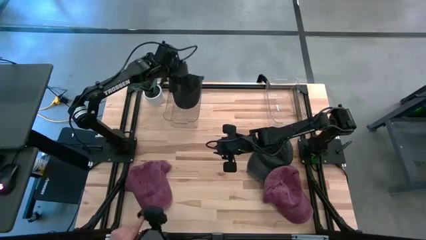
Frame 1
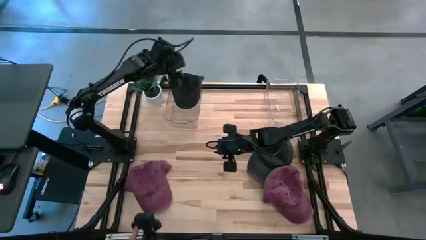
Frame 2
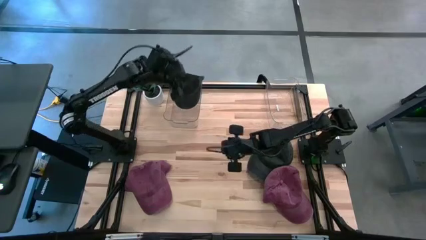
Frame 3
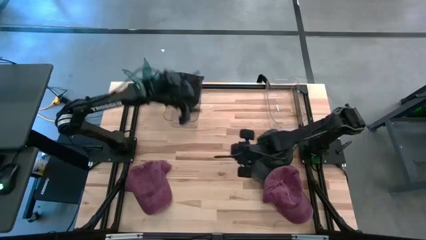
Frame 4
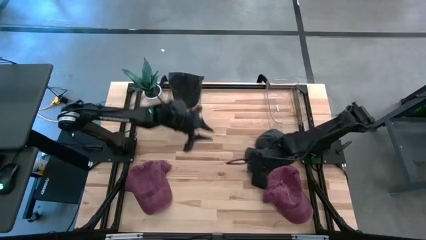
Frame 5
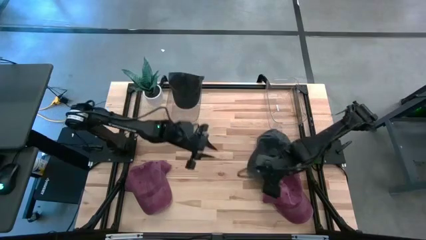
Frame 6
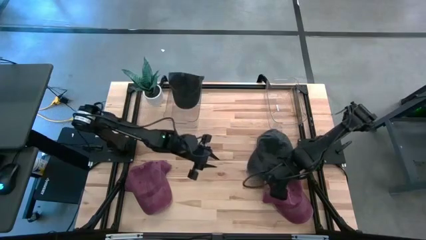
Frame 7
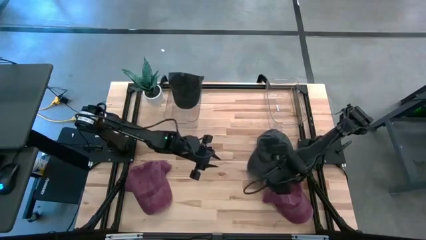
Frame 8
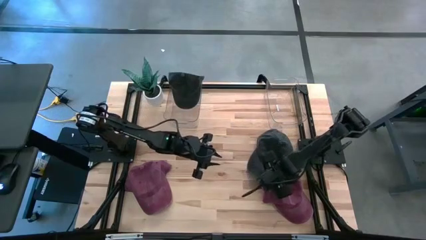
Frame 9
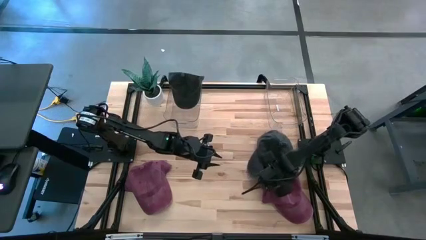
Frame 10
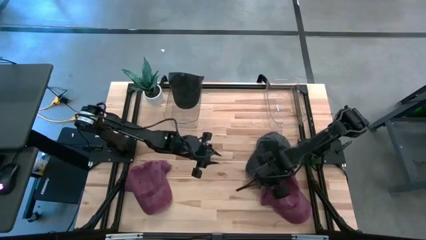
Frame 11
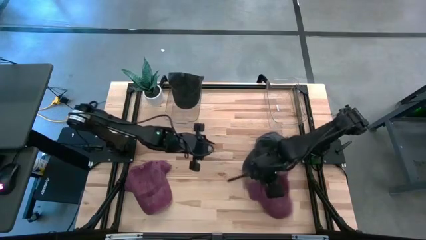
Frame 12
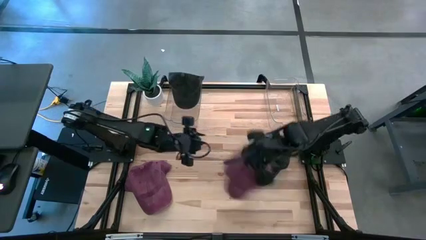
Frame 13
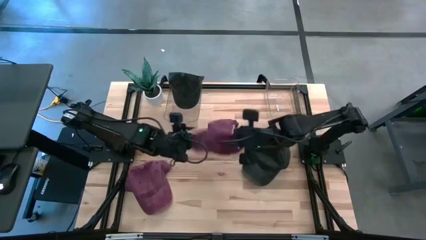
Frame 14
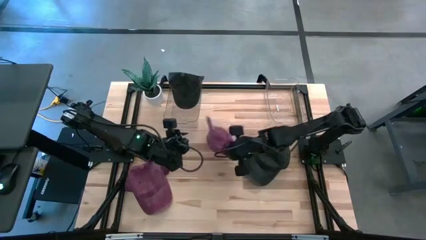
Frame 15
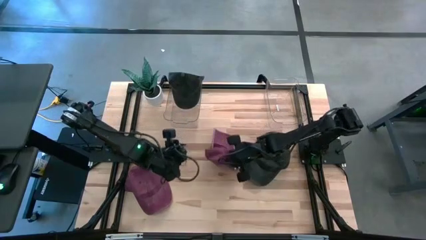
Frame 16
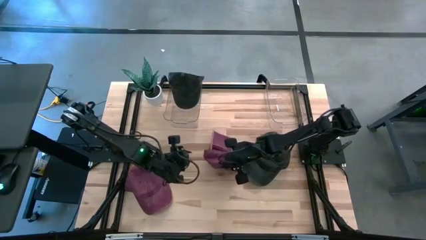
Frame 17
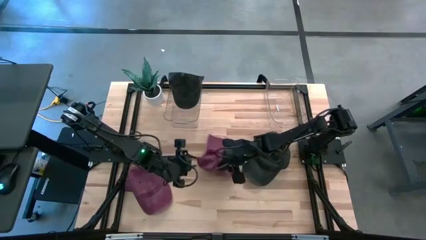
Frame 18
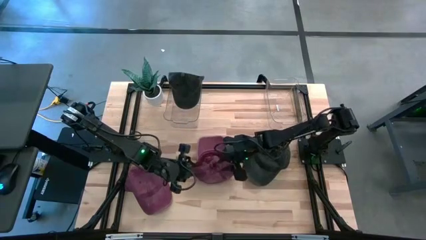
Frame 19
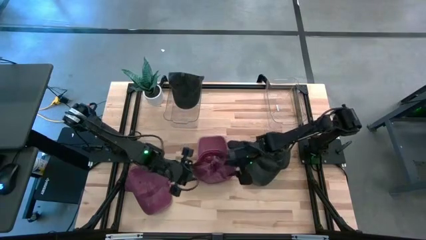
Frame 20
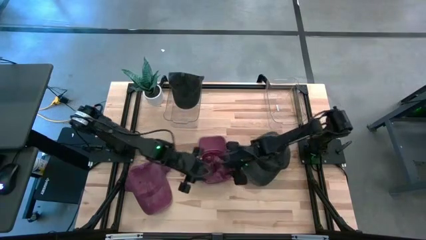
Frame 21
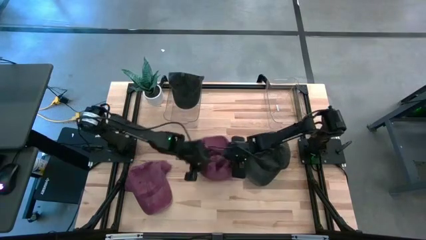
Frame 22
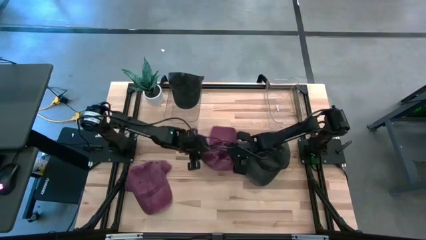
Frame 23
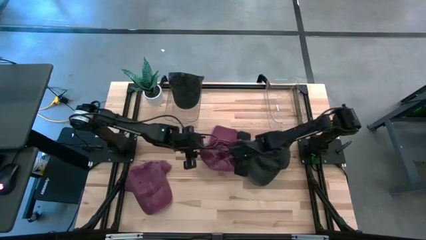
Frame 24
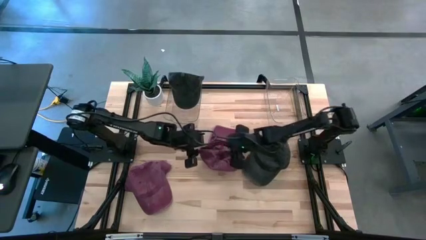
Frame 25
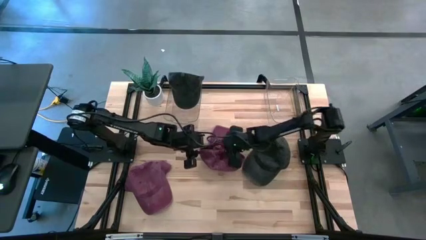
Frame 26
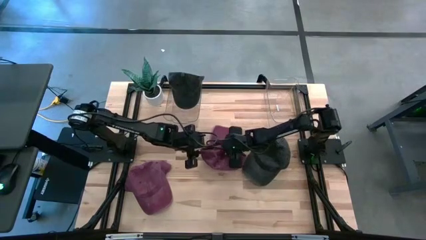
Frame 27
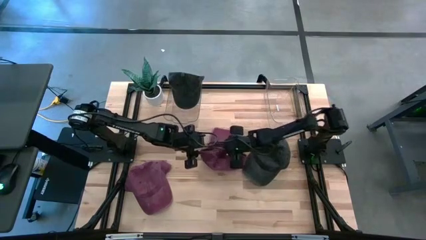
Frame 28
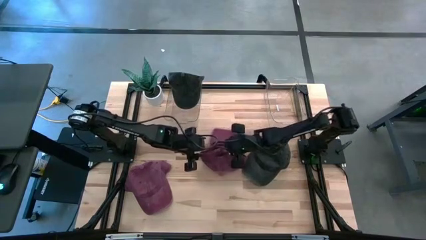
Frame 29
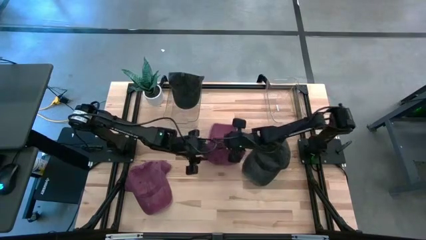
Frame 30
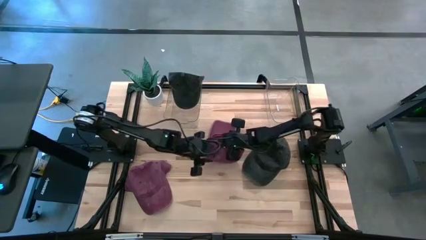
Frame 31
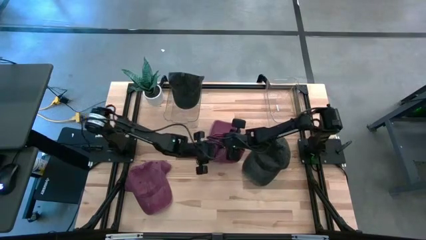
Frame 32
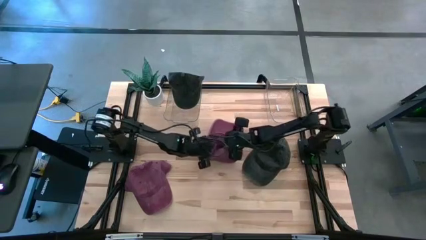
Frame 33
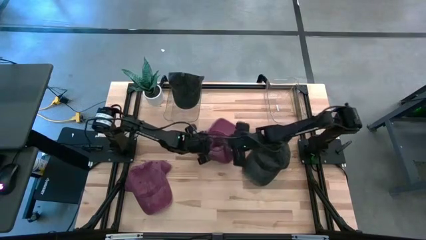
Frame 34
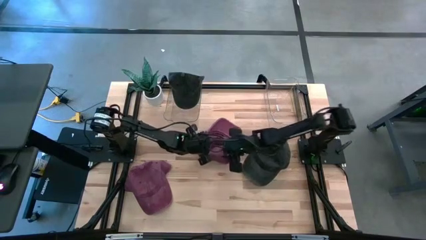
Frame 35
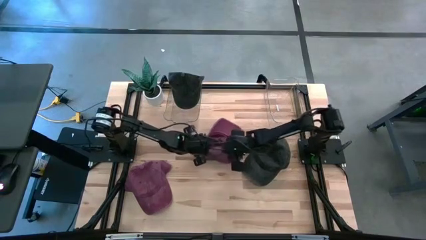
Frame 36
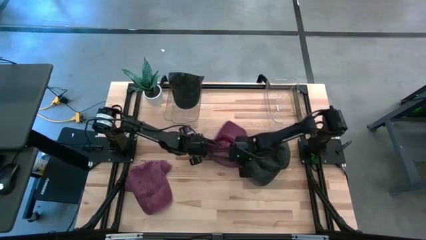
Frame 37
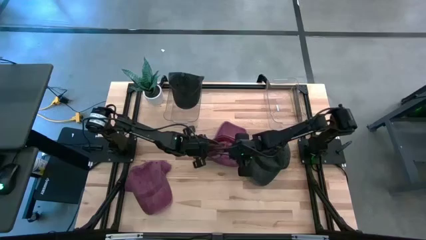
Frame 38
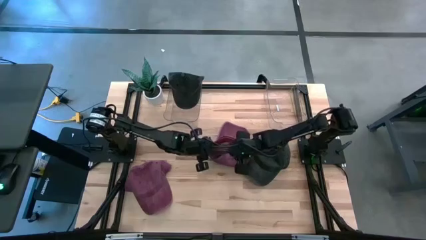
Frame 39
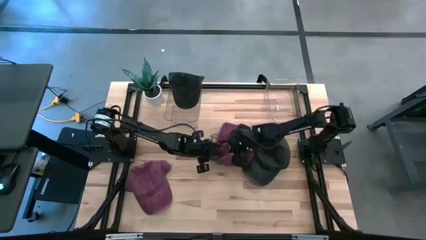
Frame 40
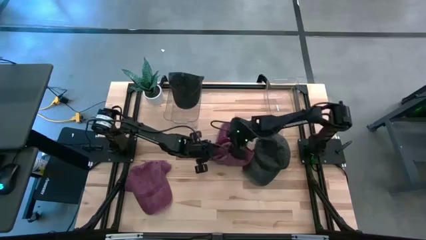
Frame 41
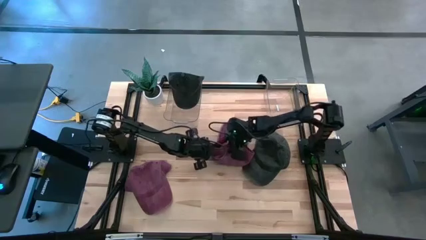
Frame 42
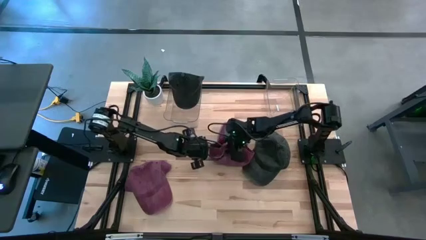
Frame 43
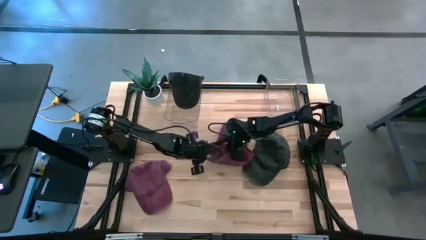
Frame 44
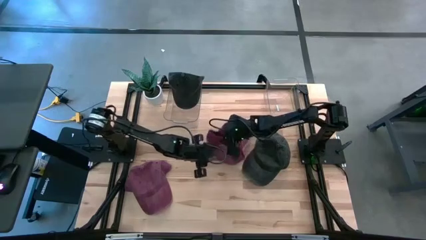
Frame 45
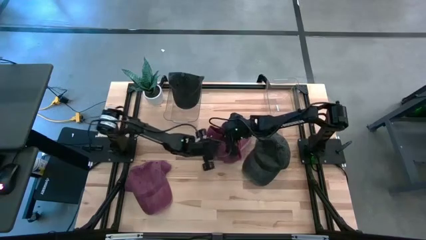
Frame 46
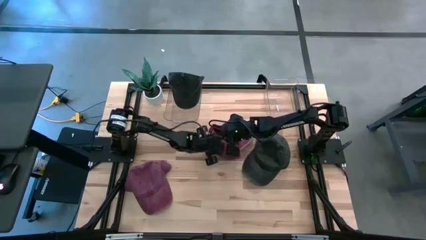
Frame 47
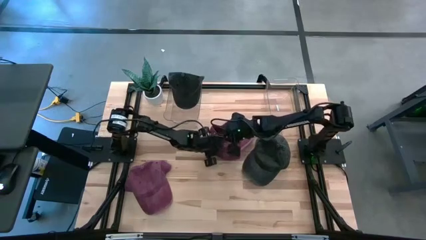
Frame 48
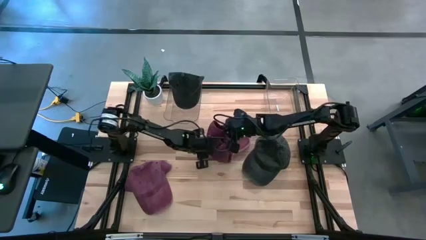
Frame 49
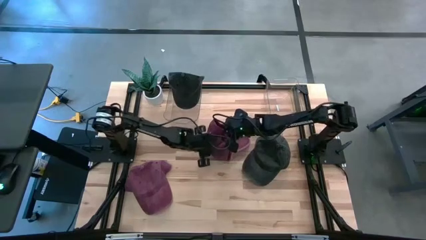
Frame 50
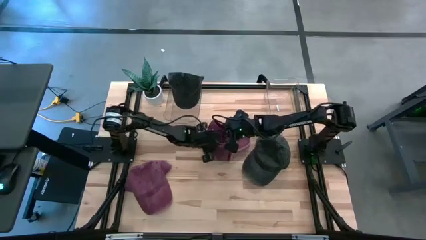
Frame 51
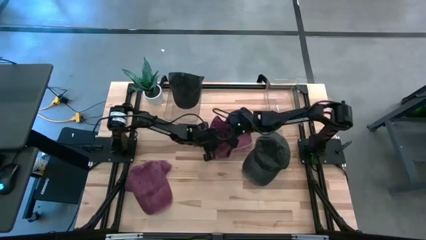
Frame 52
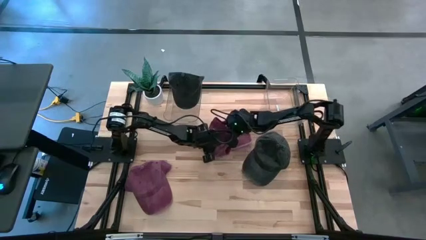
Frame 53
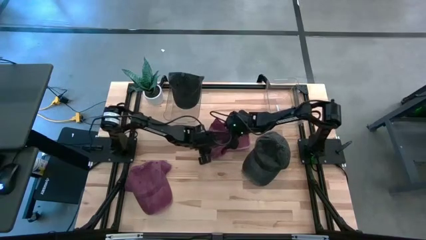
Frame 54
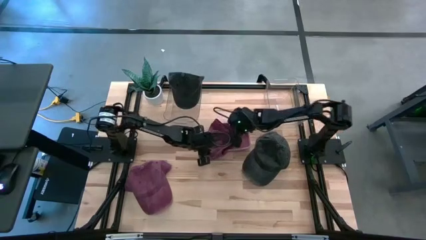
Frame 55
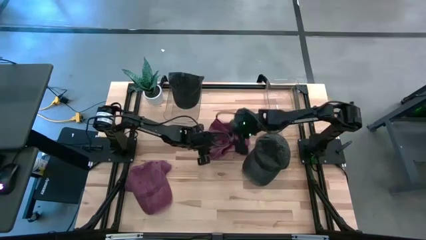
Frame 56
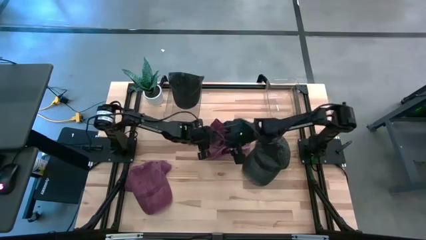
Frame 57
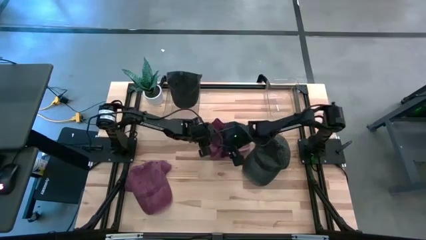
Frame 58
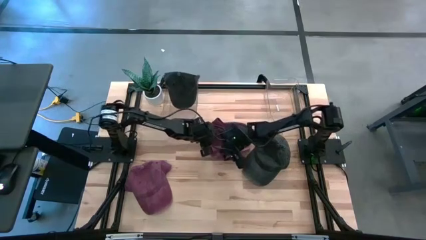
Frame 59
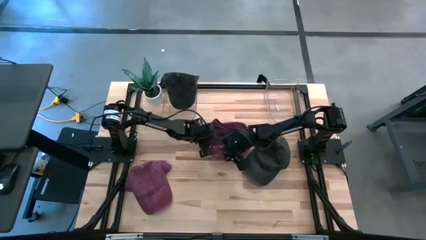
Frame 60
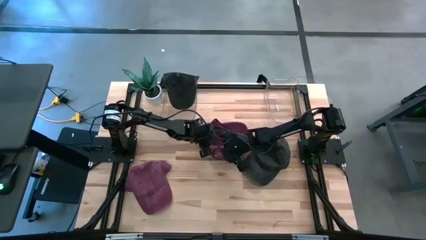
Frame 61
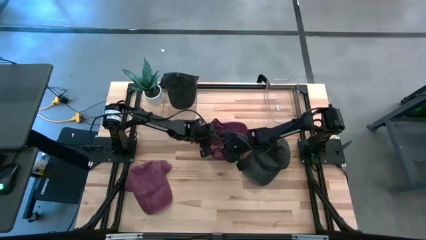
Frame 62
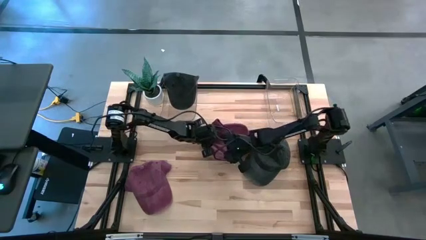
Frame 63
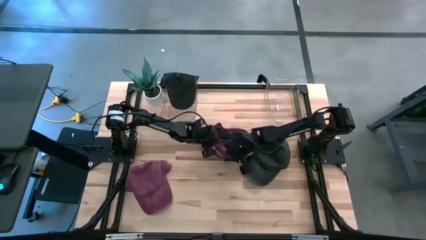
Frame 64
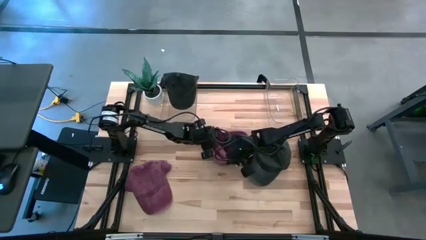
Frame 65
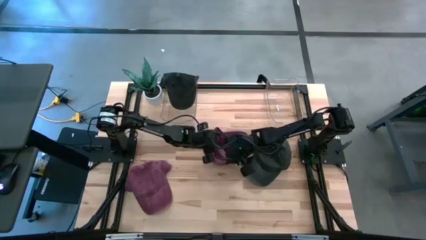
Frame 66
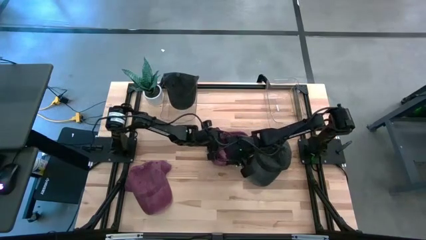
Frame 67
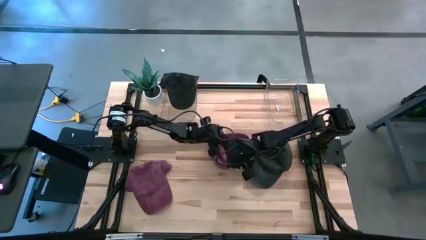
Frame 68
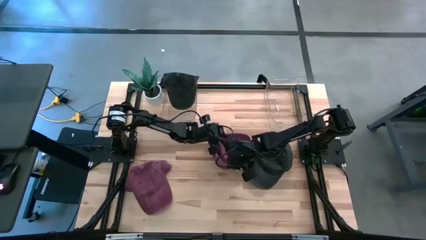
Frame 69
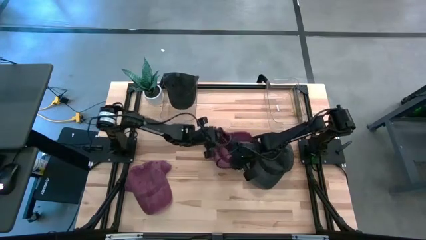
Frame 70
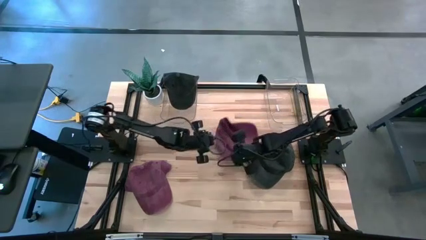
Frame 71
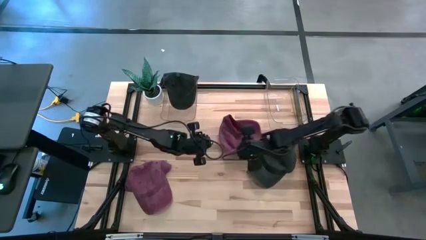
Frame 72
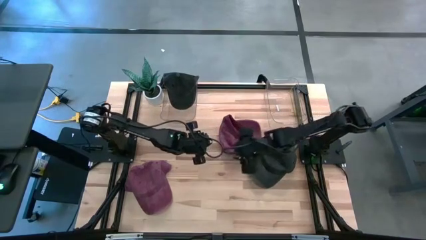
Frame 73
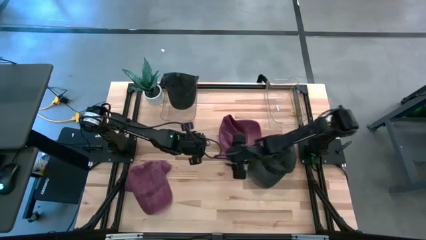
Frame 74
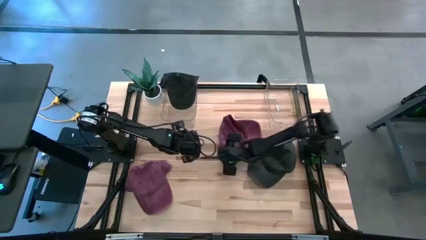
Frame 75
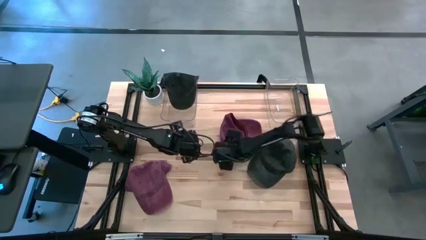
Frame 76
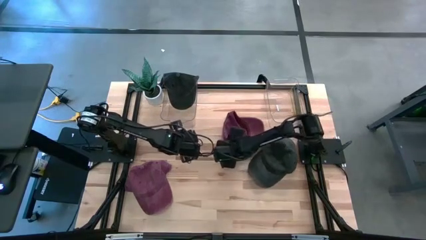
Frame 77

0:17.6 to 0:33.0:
Task: Pick & Place hat
Put the right red cap into the right transparent bin
